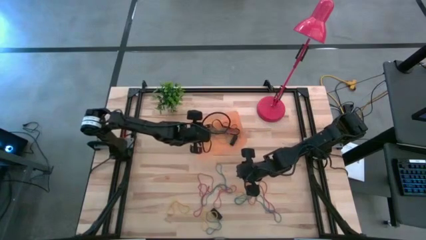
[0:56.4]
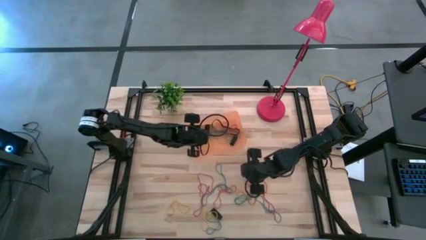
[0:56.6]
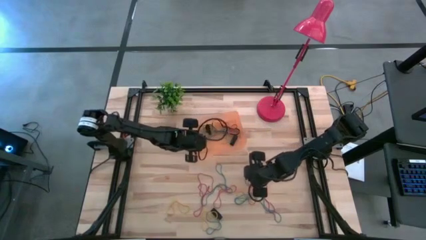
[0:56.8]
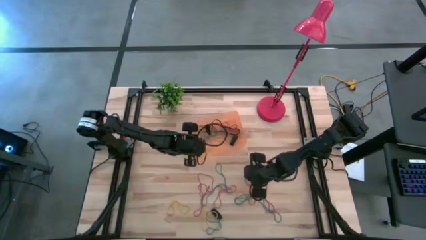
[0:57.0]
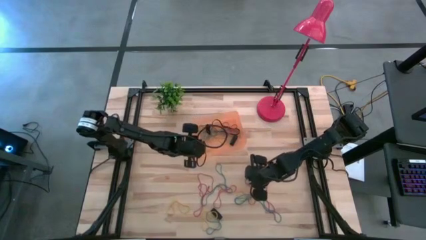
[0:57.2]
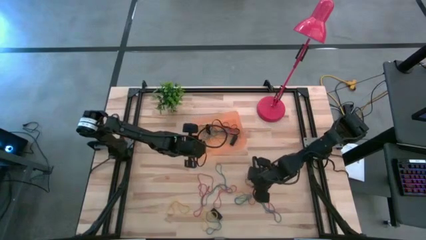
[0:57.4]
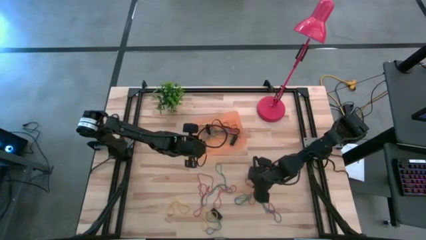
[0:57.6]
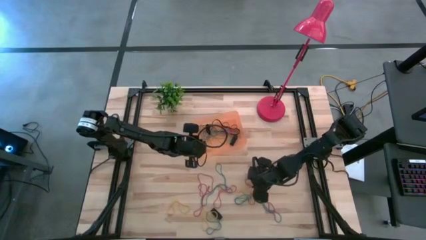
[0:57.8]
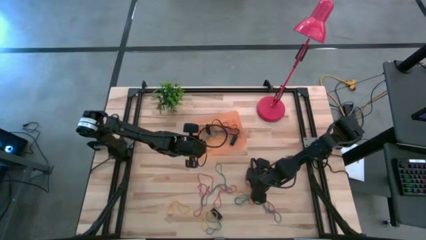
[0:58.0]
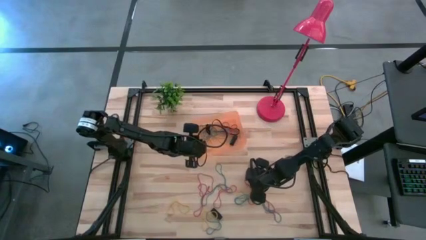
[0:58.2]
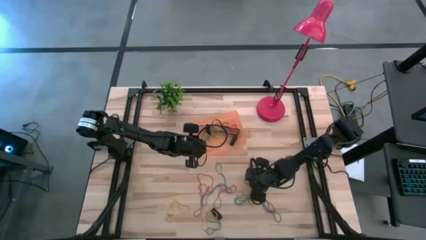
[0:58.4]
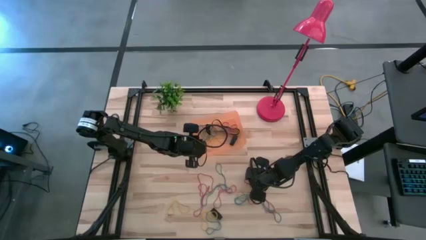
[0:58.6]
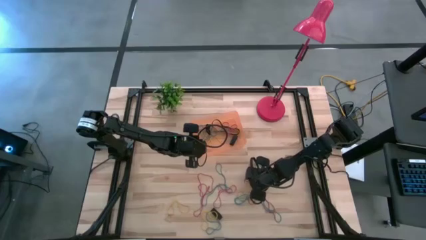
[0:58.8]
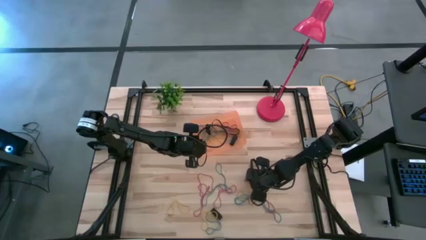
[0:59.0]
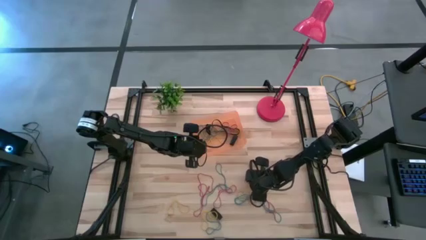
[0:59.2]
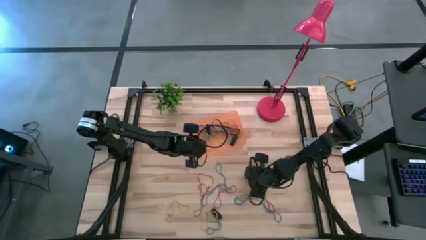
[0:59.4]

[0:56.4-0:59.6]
Task: Pick and place rubber bands into bin
Put the red rubber band into the orange bin

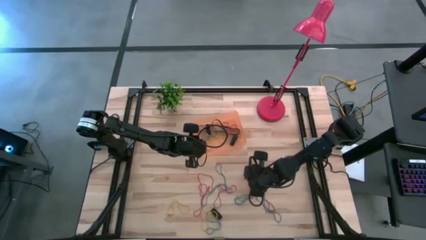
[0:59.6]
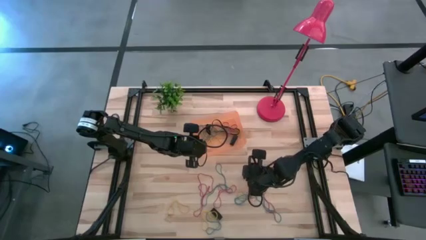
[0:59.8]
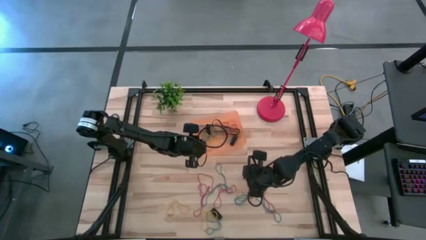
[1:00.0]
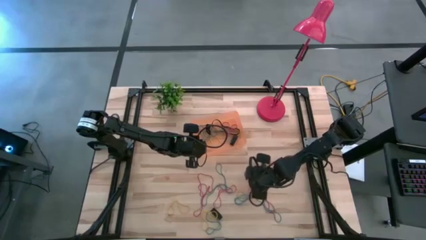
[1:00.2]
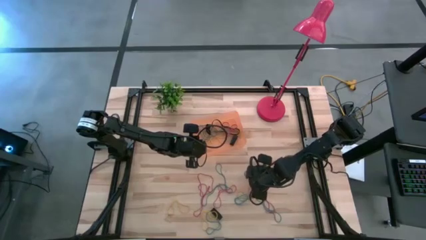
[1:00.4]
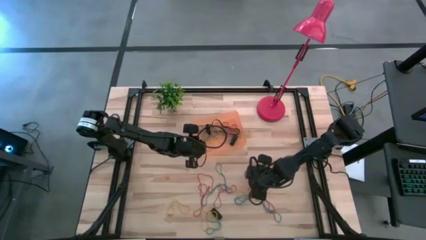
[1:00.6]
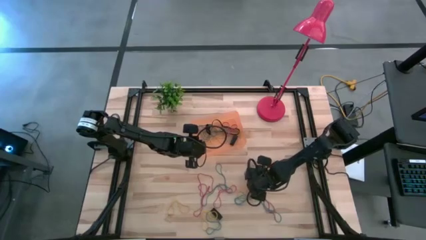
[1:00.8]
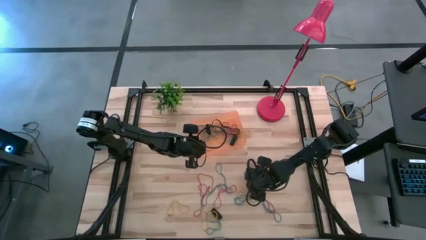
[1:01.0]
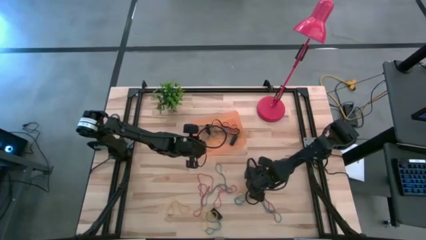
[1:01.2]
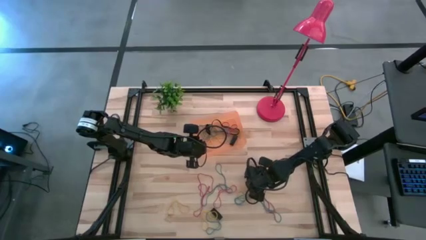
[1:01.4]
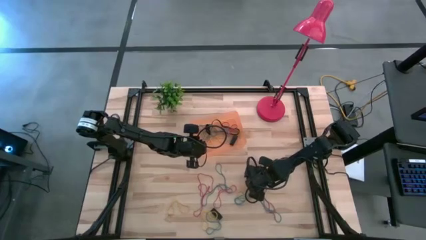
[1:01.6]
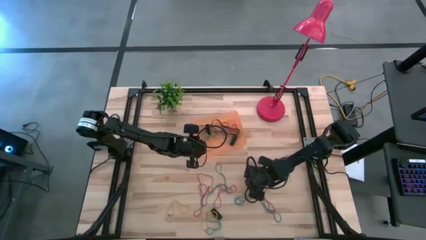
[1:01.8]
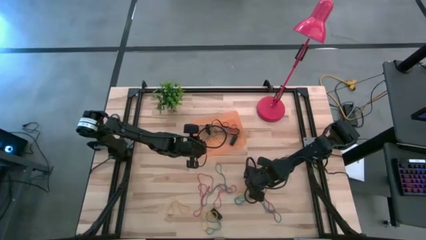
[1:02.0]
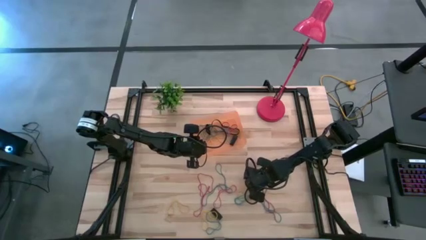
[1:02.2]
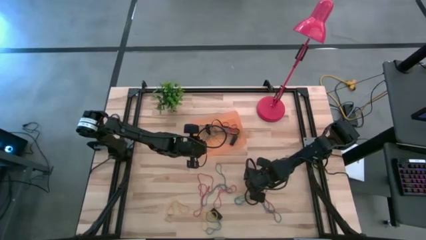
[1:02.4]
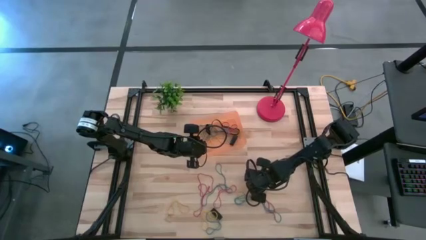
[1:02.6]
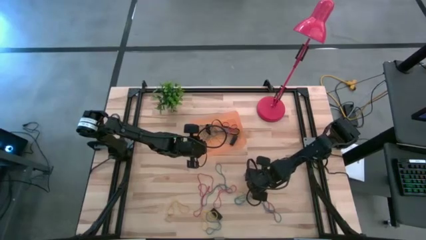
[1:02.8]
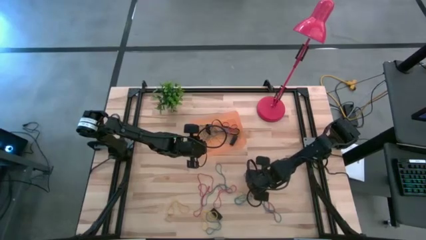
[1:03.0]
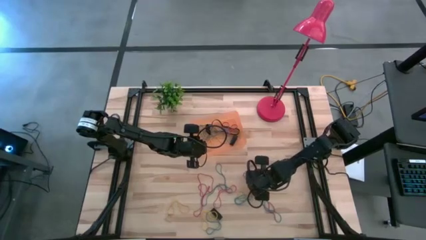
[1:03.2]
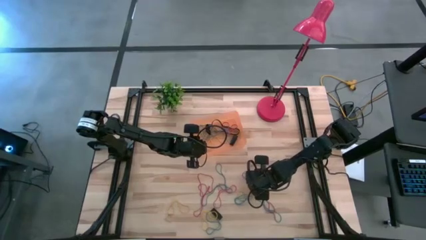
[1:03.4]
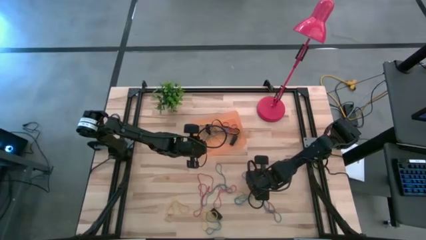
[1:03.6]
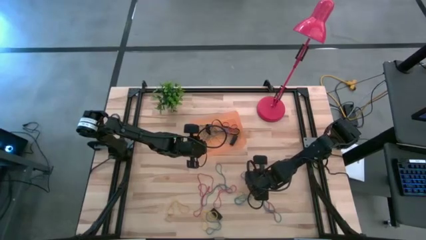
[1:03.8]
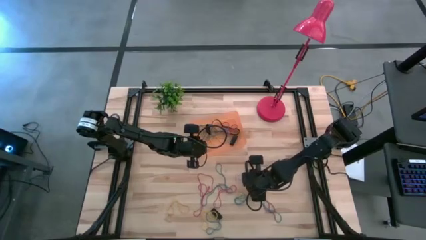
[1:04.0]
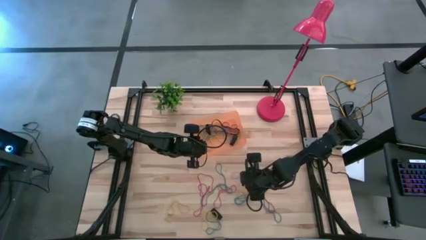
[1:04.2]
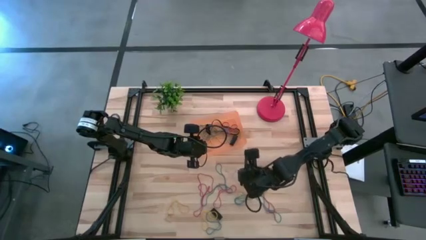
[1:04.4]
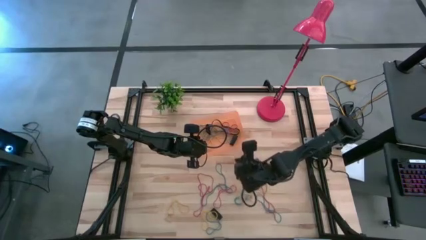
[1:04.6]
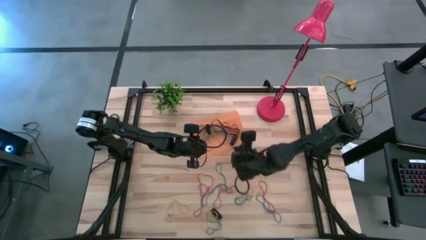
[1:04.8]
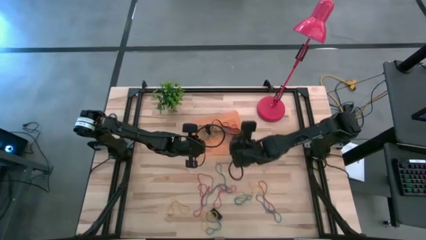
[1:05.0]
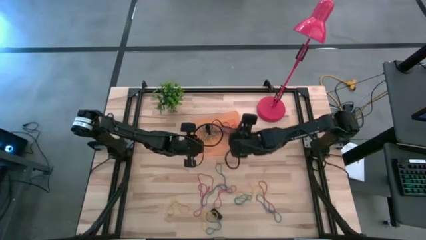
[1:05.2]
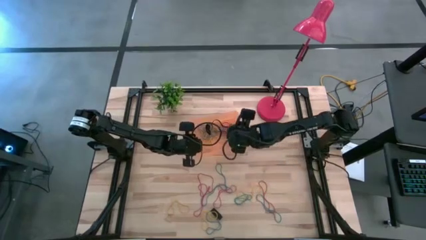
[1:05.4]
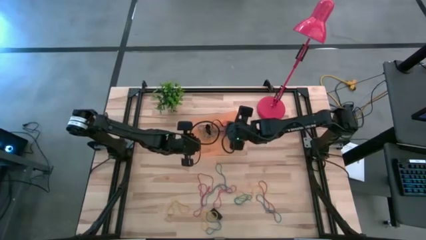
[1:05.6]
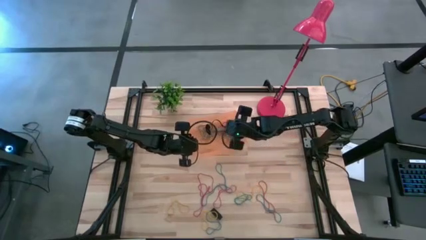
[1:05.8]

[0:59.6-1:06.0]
Put the red rubber band into the orange bin

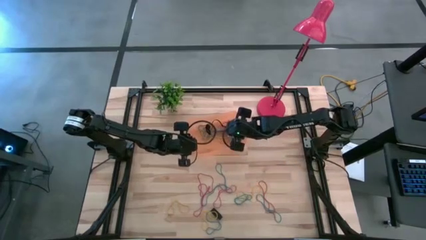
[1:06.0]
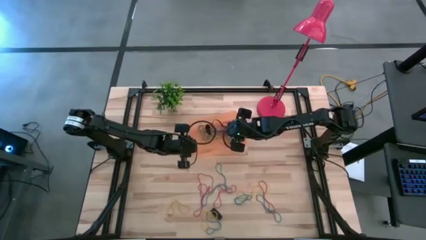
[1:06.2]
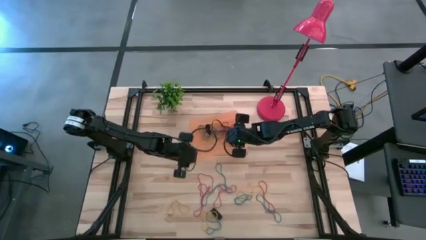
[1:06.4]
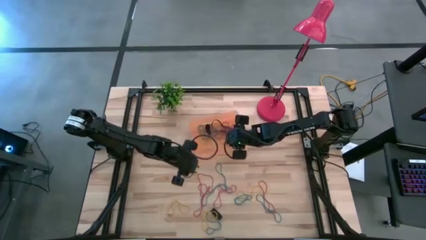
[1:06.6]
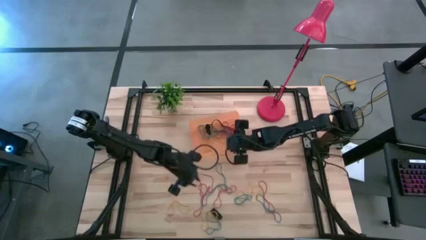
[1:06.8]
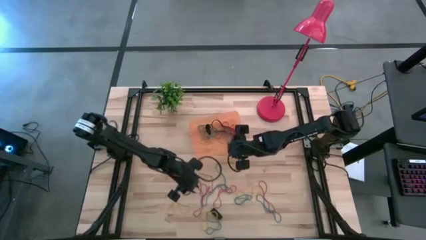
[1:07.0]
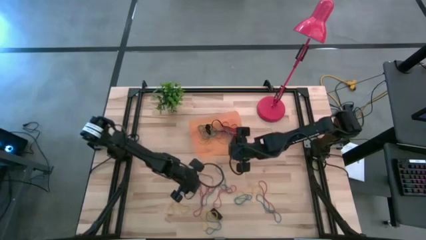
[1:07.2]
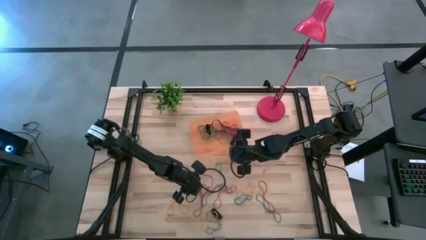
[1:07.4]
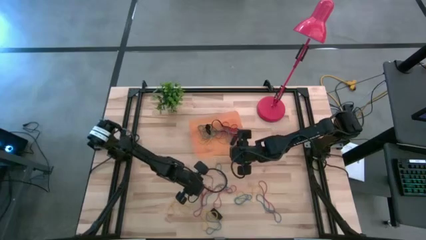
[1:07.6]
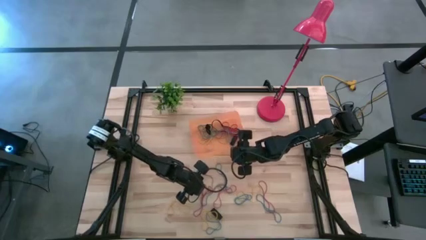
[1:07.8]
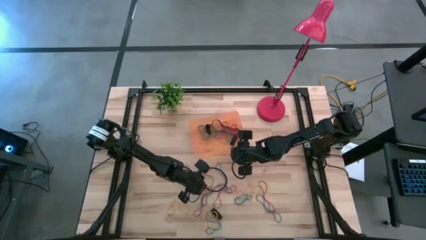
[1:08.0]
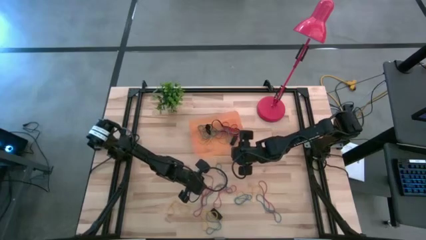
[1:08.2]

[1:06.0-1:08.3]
Put the red rubber band into the orange bin

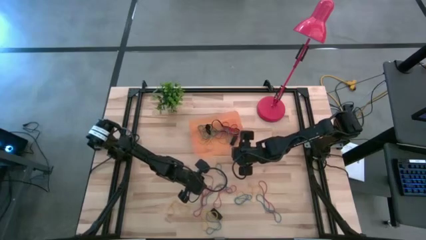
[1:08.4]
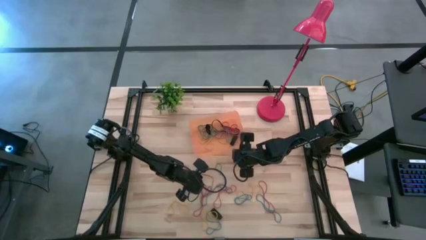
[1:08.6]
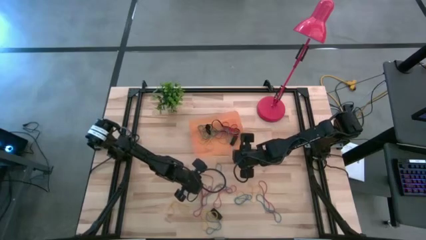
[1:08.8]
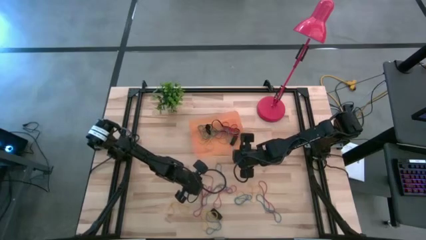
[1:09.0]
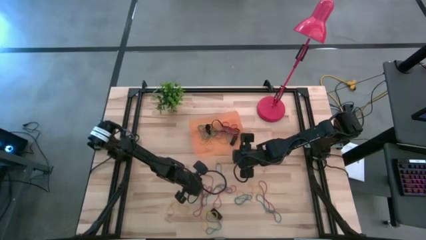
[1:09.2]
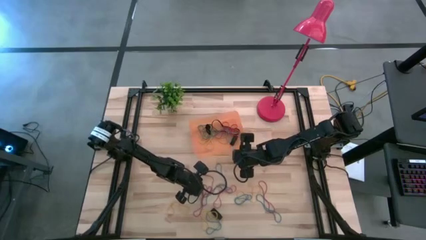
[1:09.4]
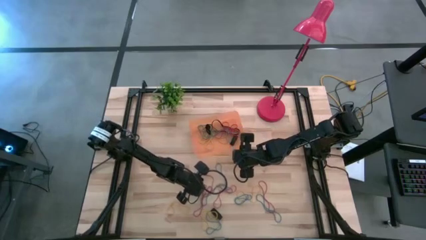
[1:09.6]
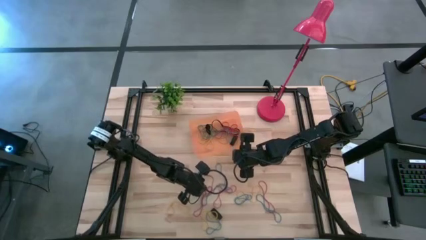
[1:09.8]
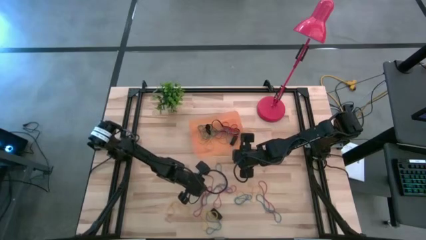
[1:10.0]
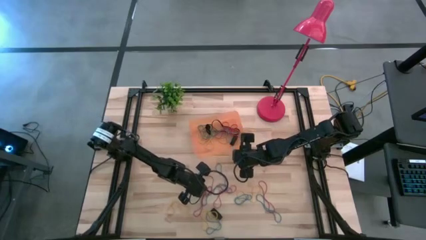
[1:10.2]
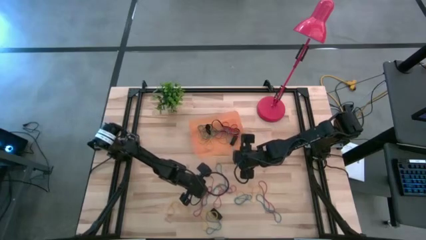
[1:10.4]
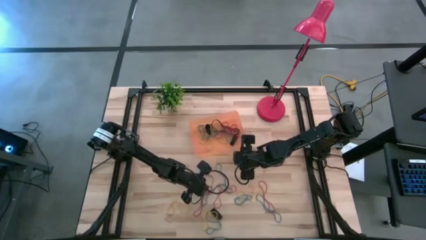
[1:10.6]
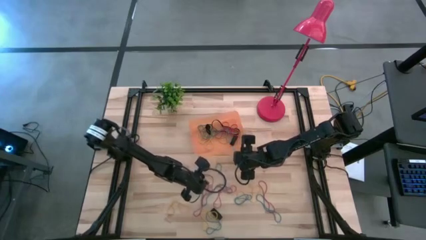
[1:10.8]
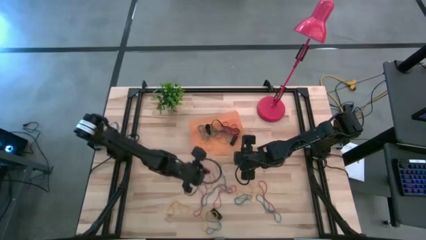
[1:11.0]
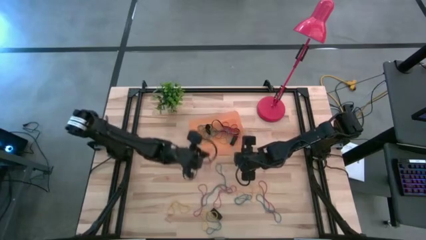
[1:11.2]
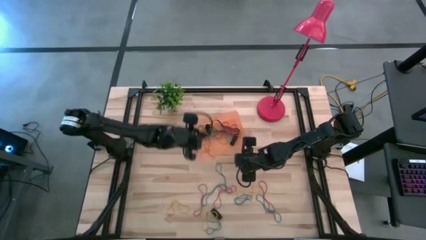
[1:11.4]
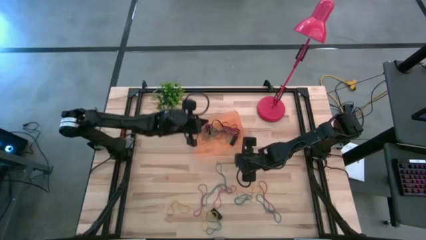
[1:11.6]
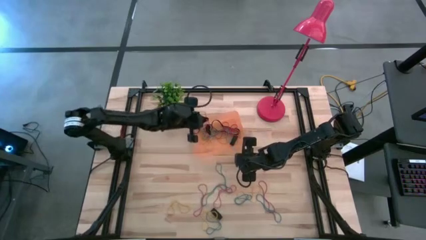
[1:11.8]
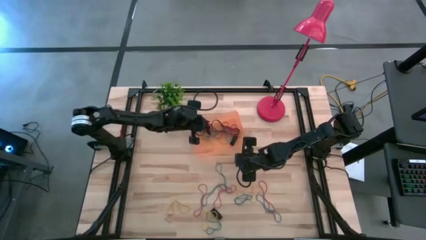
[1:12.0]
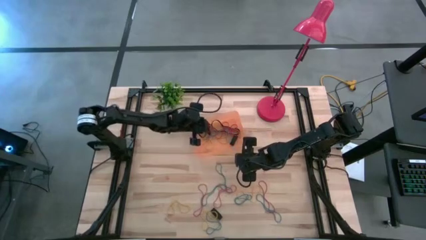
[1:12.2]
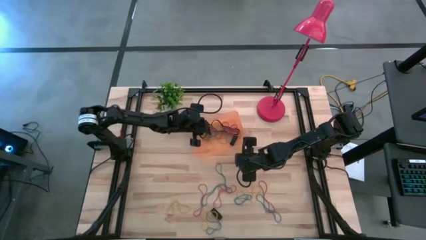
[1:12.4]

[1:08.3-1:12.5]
Put the red rubber band into the orange bin

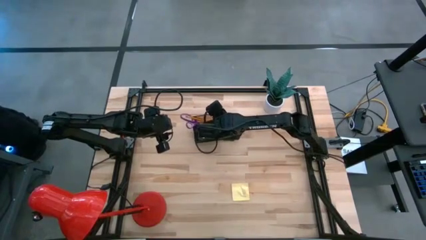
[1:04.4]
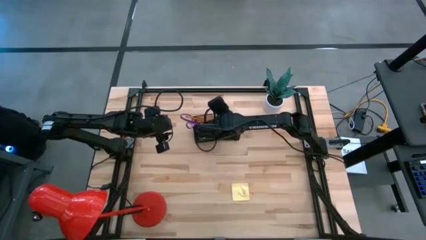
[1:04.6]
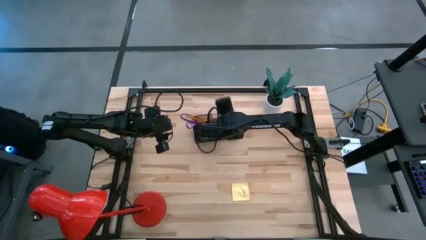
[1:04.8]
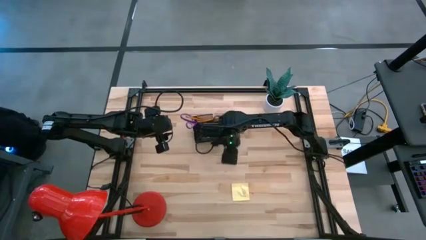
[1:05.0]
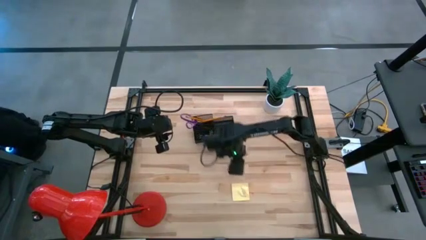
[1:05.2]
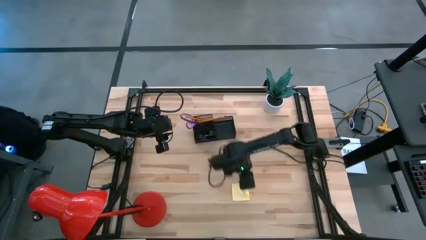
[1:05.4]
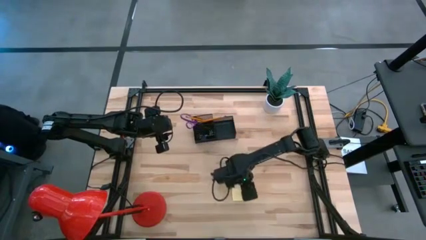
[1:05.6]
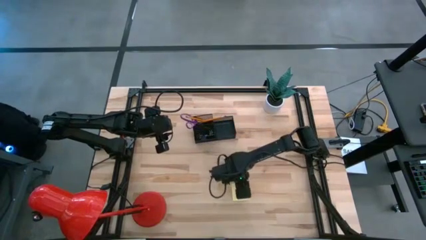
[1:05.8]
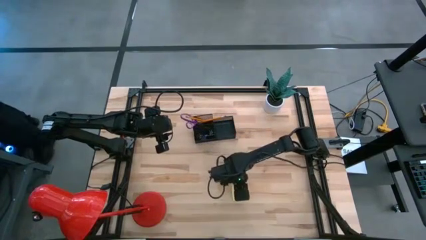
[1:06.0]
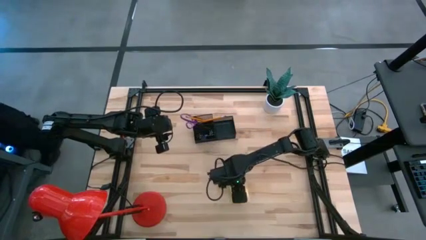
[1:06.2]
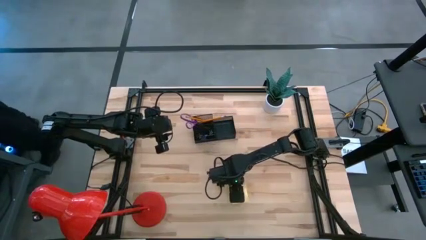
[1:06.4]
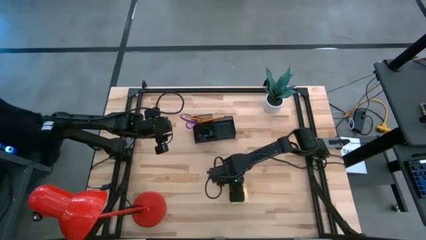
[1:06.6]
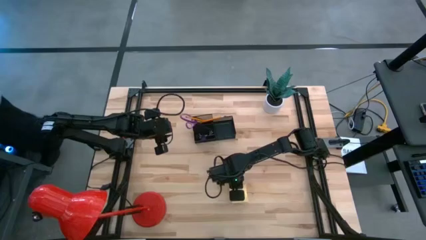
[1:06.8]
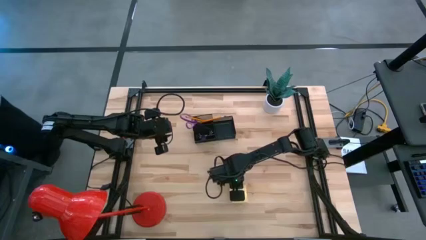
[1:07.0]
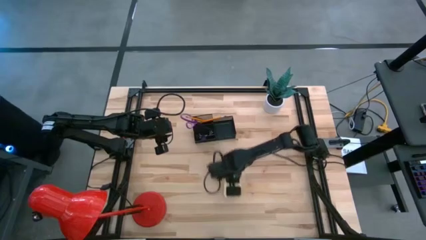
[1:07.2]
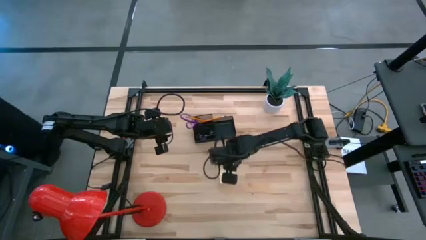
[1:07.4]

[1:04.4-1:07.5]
Task: Pick and place office supplies into organizer
Put the yellow sticky notes into the black desk organizer
